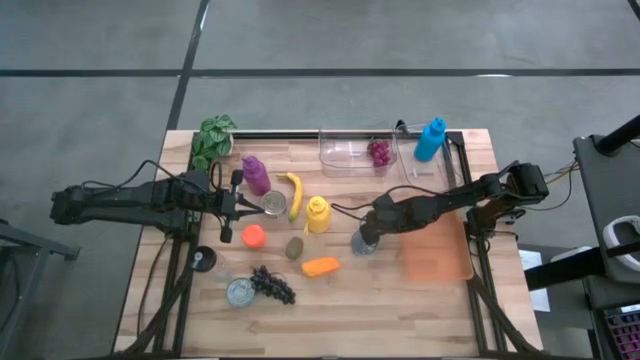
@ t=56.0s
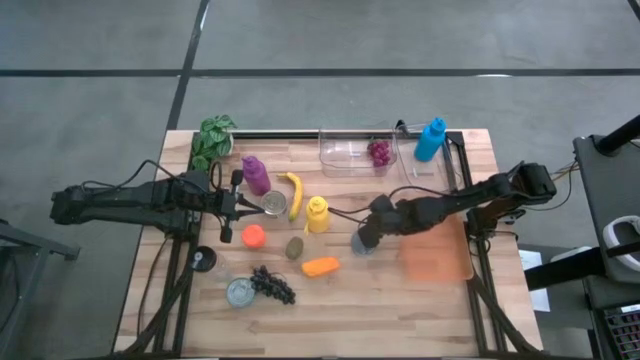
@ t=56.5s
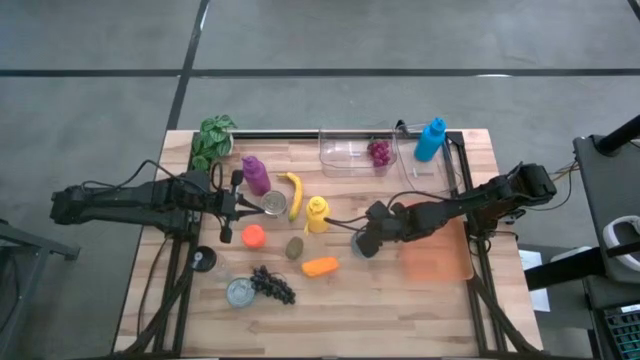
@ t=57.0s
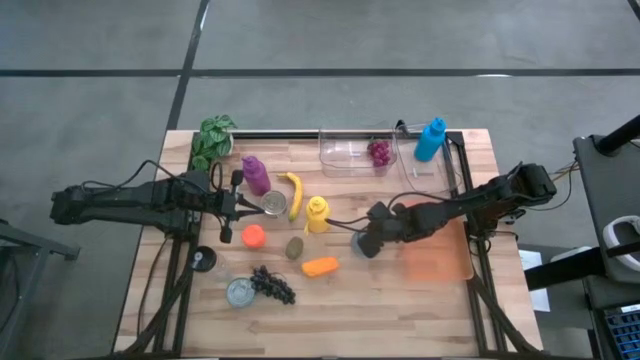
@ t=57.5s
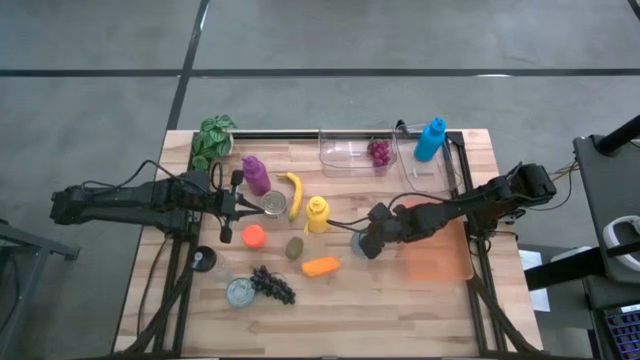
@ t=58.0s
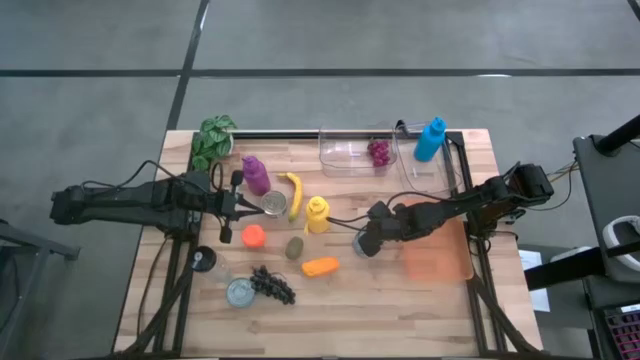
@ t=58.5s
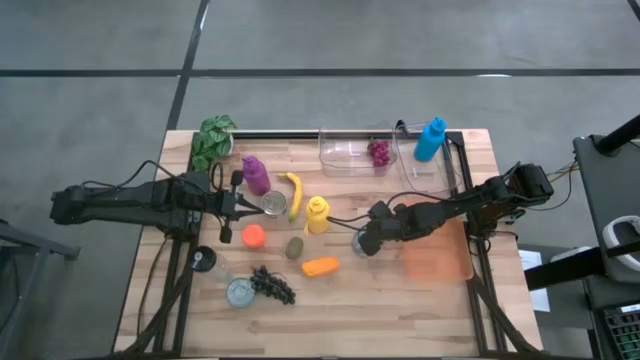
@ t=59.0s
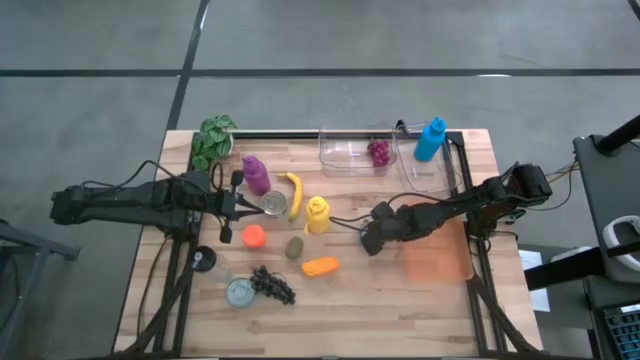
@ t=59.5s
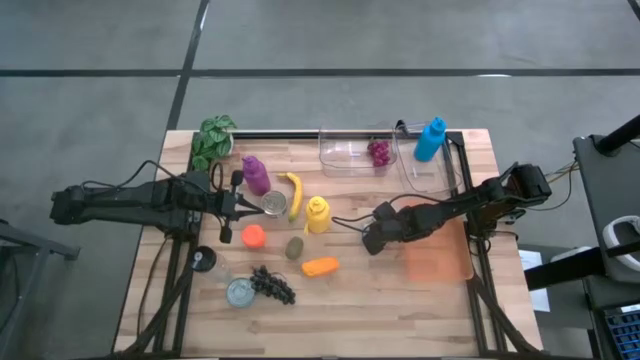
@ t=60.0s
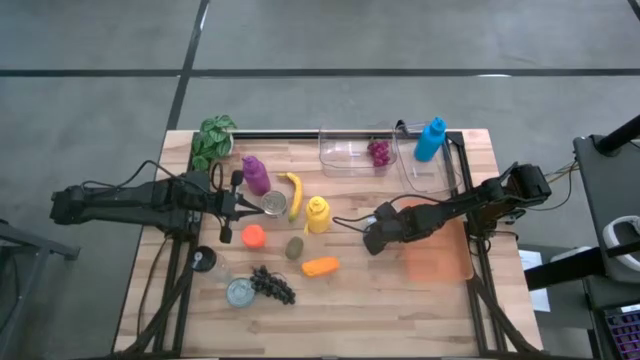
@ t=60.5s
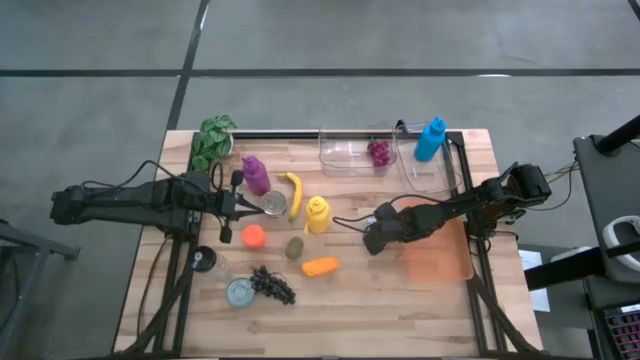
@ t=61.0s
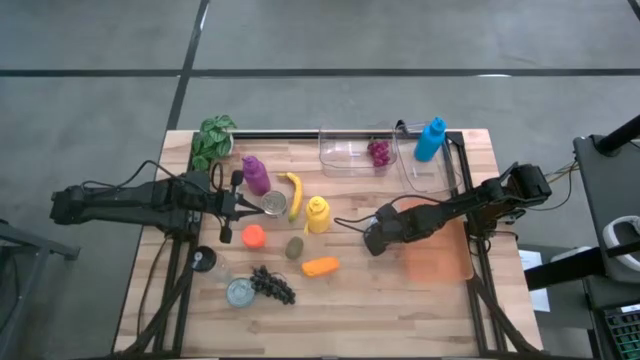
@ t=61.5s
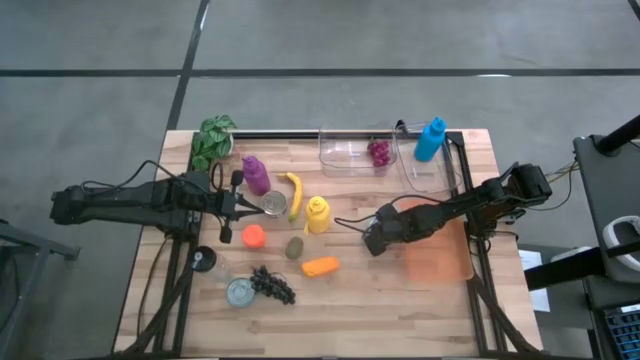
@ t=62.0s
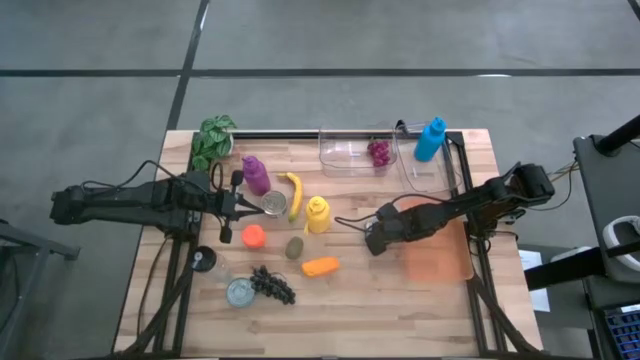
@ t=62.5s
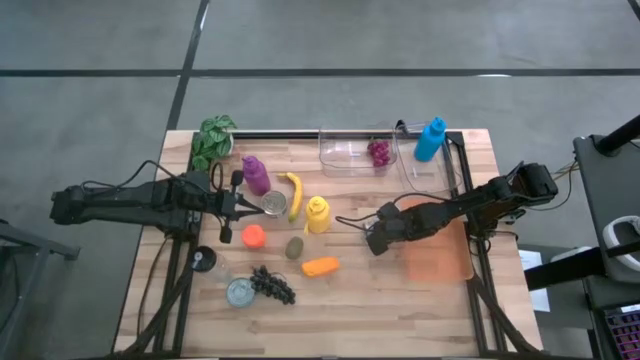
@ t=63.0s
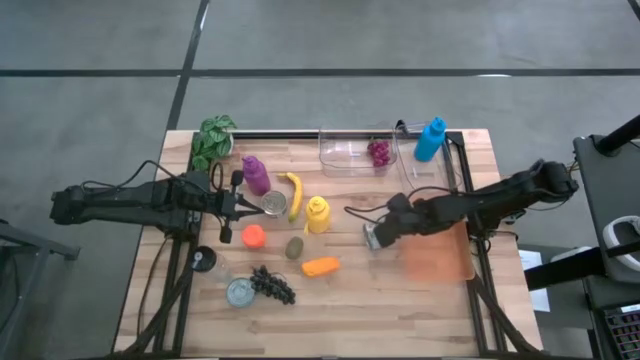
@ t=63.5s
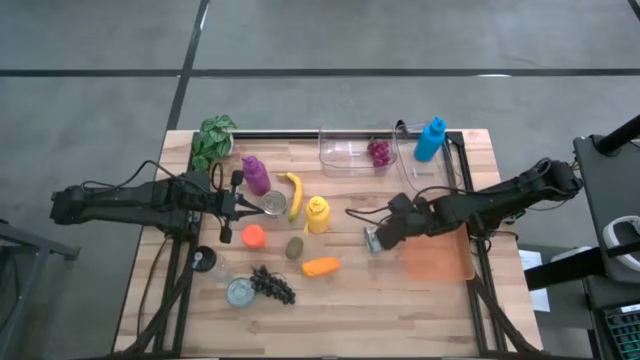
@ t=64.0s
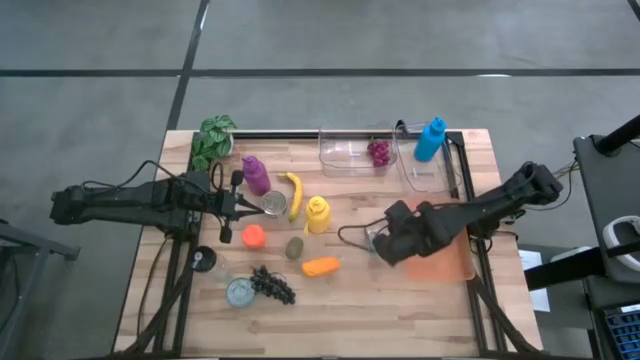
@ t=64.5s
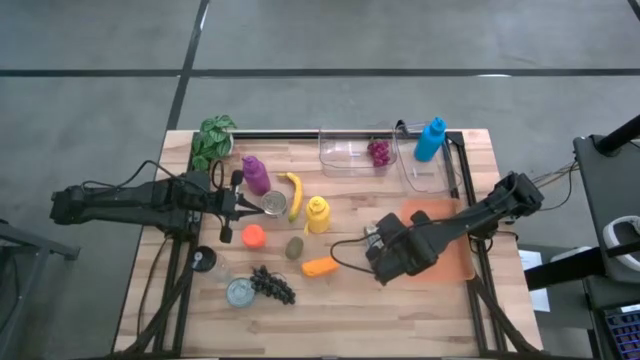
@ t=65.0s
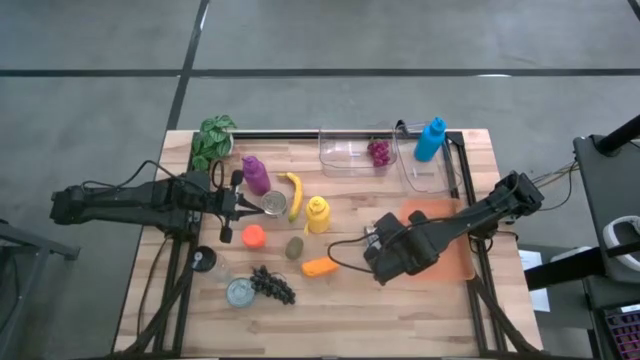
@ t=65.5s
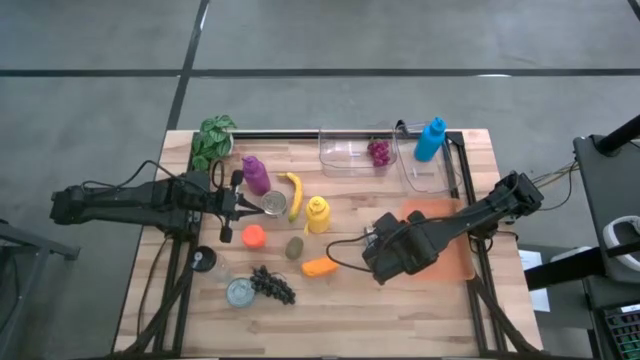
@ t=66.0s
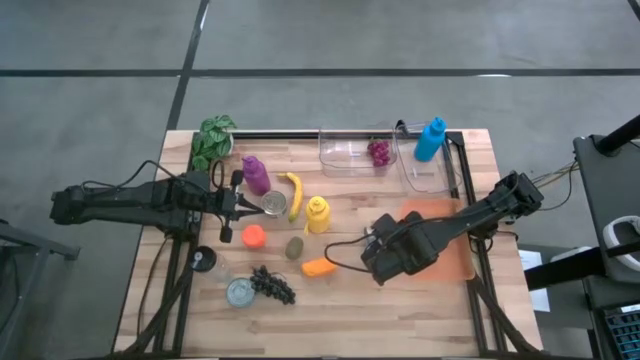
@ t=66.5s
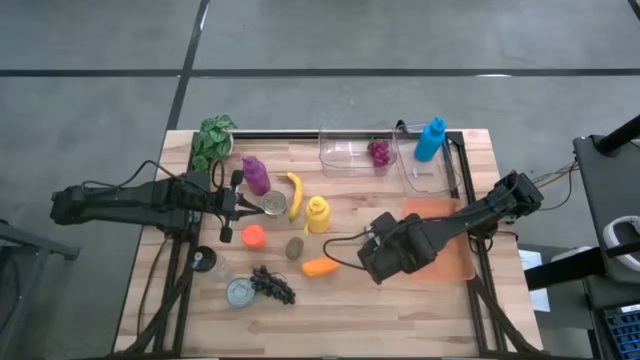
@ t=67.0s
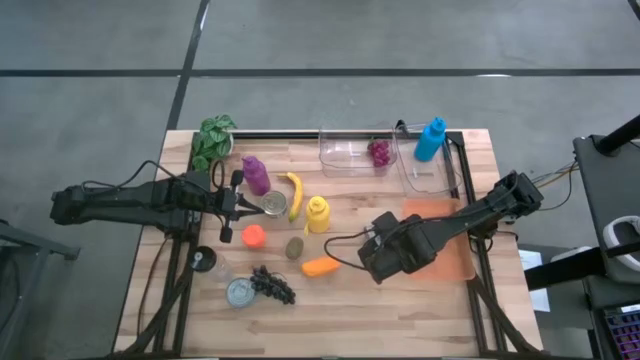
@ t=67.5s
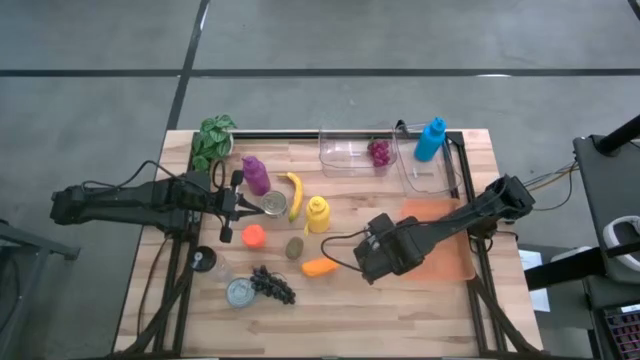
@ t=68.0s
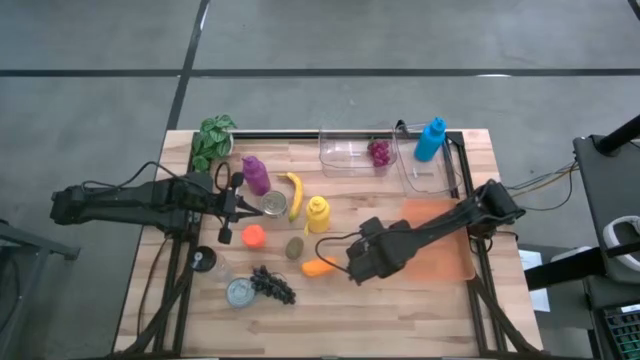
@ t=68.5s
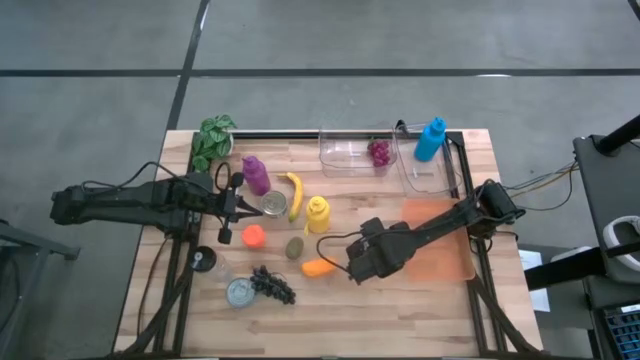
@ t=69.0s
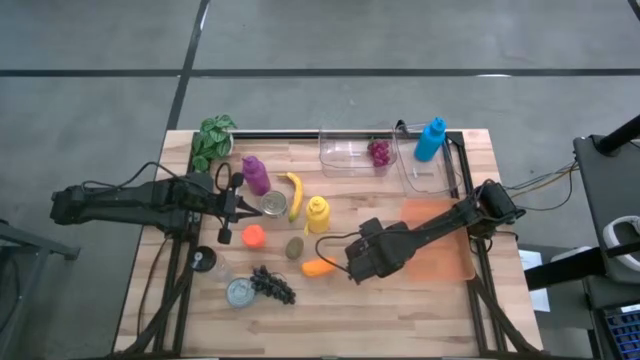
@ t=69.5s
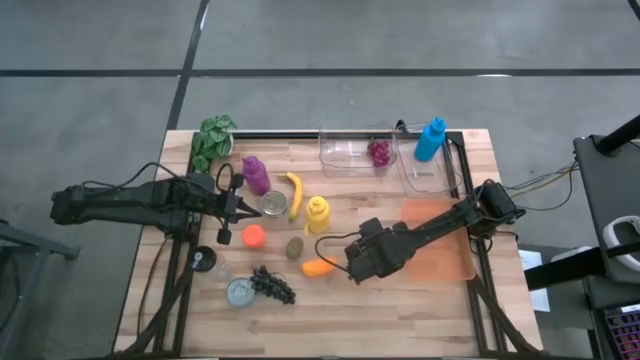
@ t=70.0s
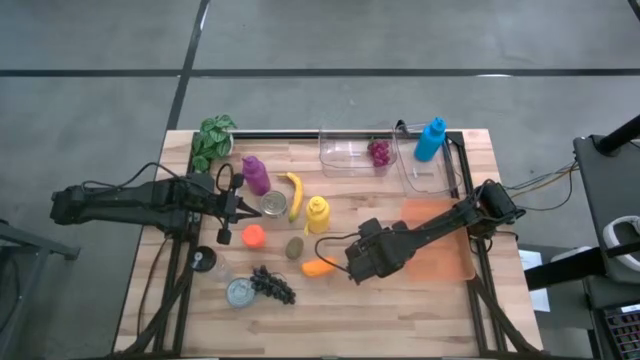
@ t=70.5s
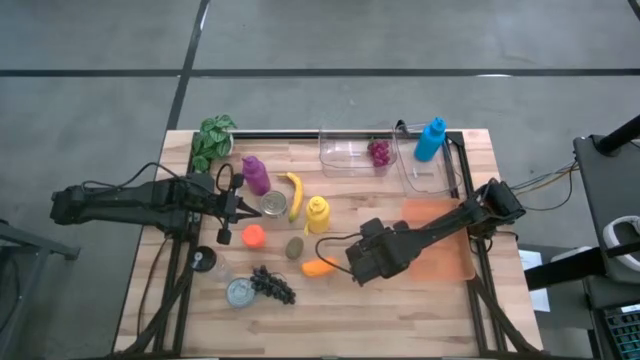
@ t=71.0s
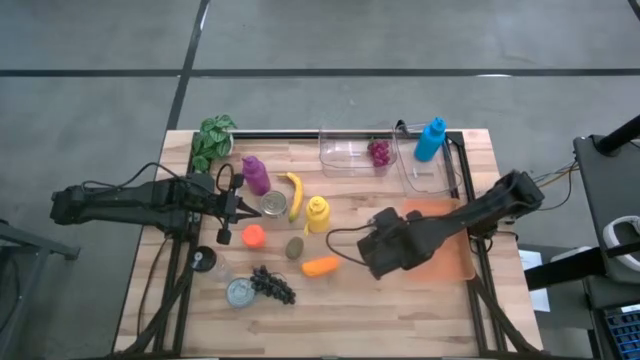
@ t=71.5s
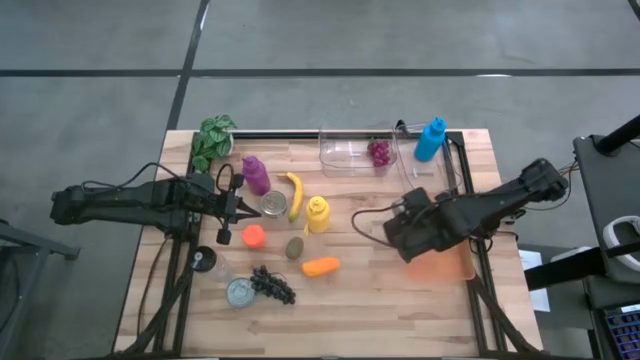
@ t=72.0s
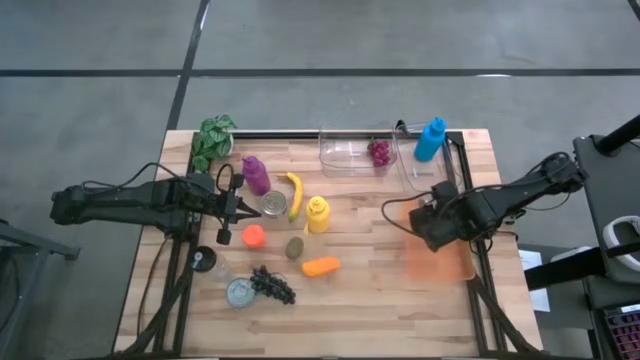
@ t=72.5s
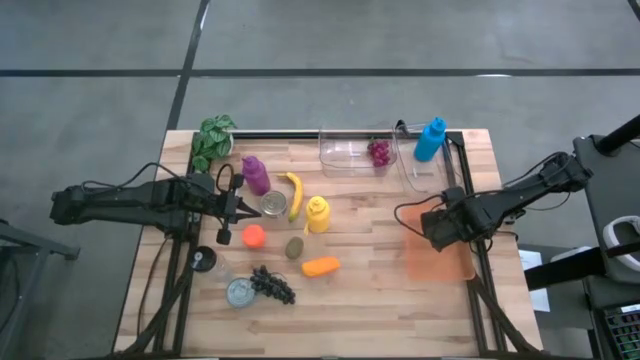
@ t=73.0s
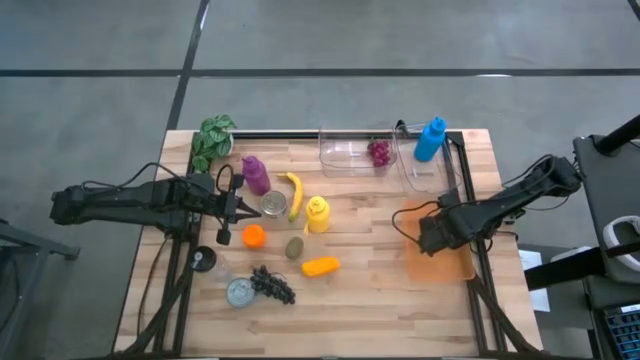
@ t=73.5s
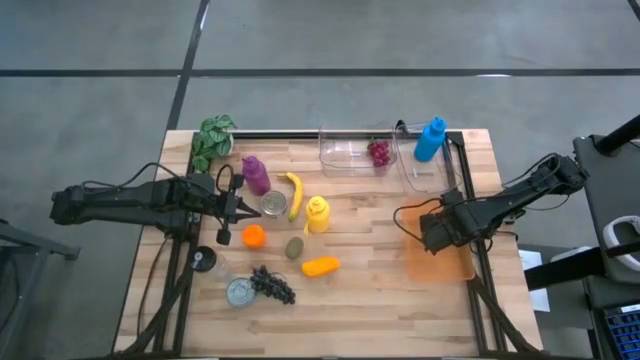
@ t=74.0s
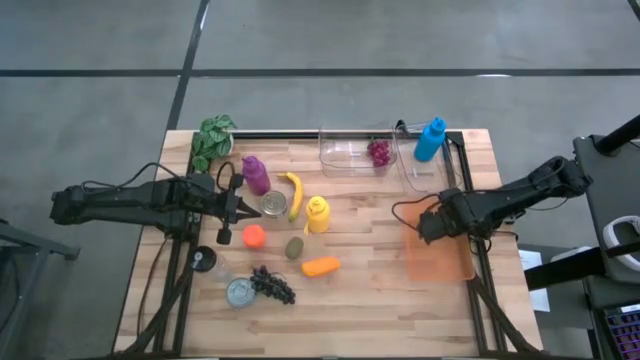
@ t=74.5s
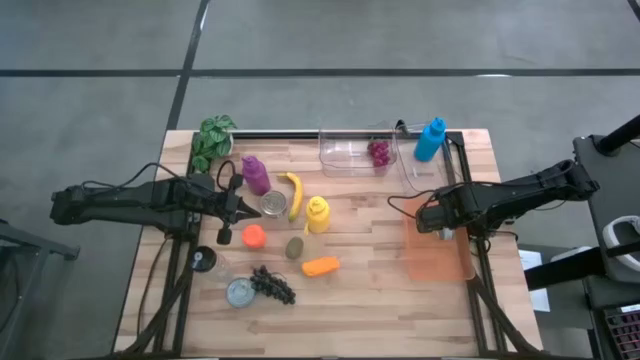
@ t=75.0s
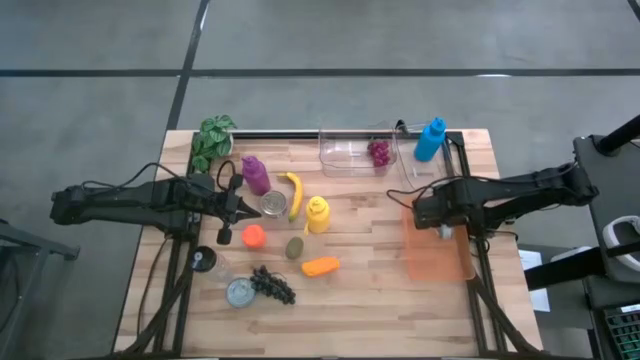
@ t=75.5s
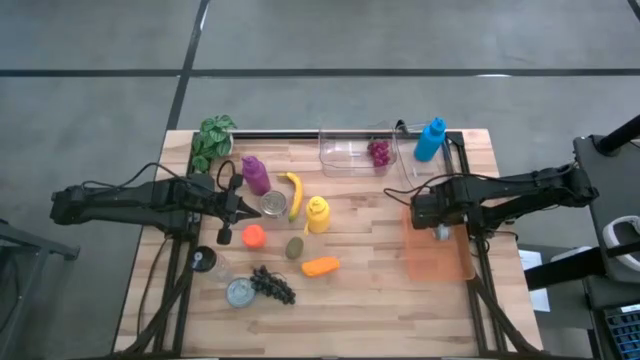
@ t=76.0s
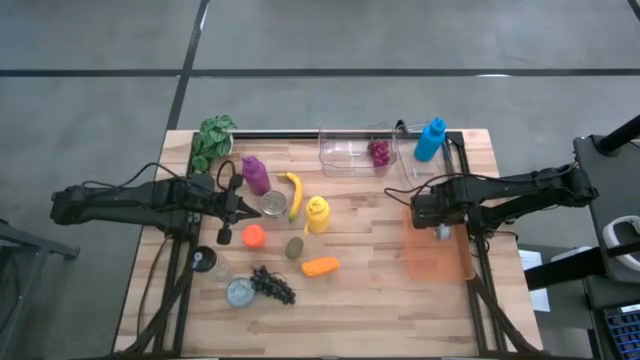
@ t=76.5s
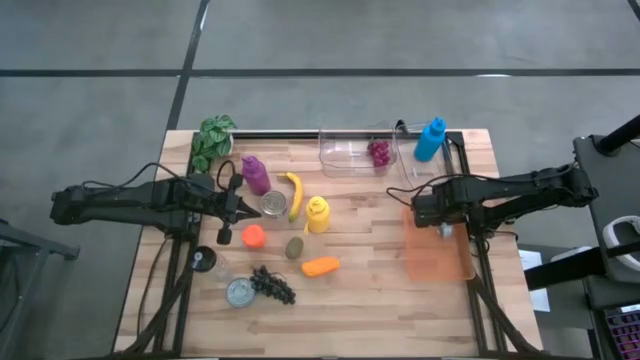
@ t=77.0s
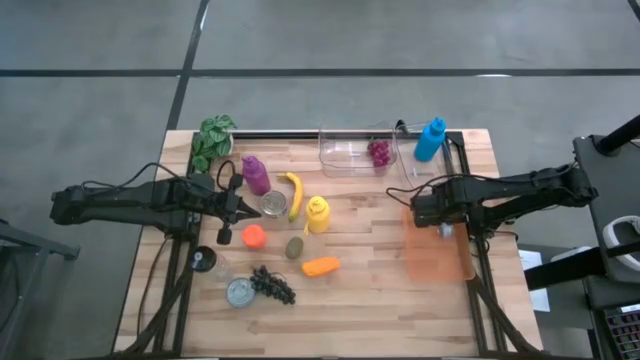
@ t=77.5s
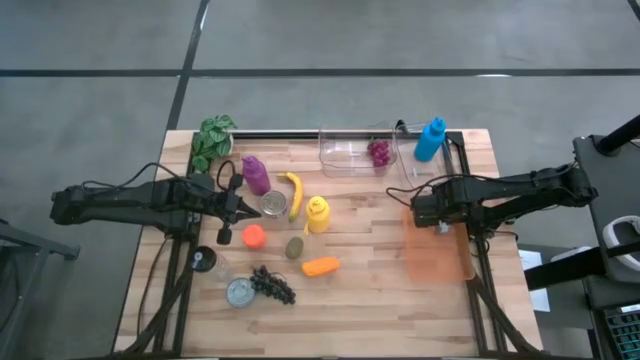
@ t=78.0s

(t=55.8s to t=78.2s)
Task: Pick & Place Food Item
Put the yellow and blue tuna can into the orange bin
